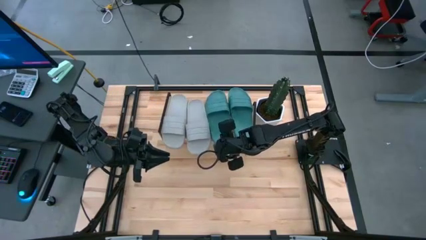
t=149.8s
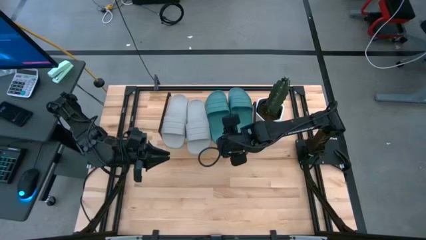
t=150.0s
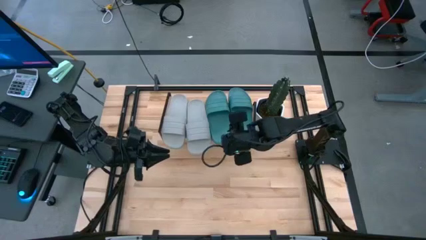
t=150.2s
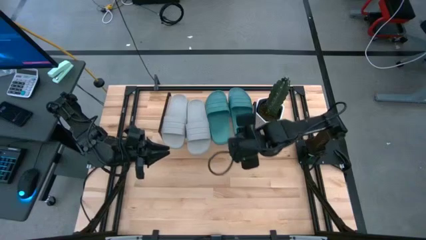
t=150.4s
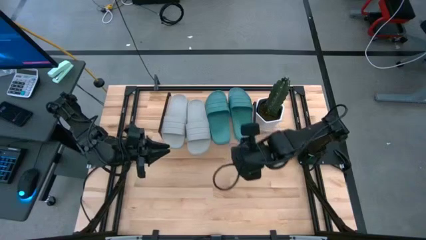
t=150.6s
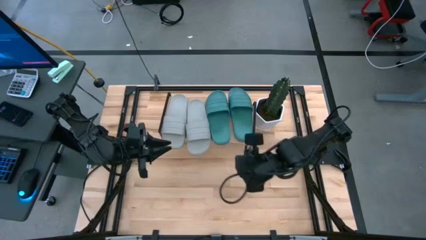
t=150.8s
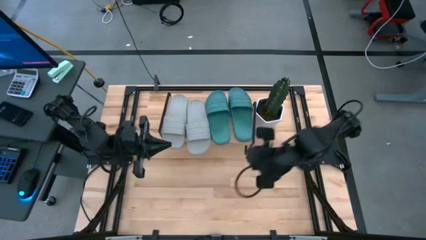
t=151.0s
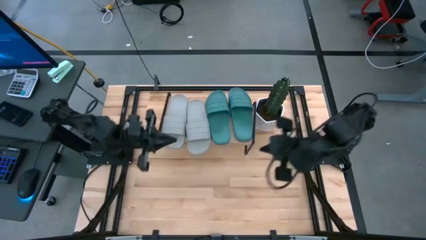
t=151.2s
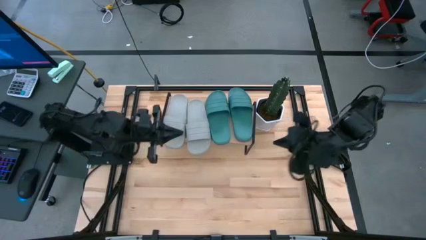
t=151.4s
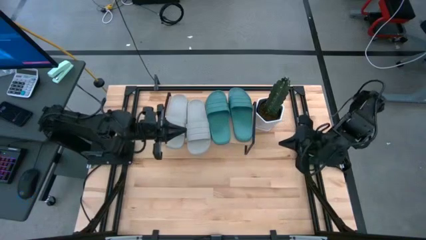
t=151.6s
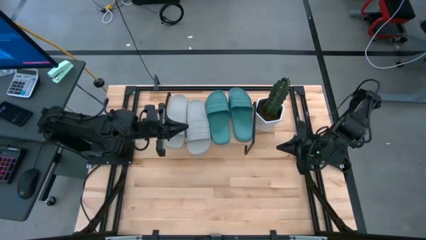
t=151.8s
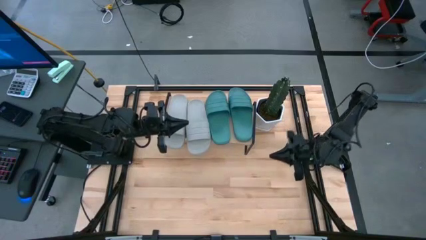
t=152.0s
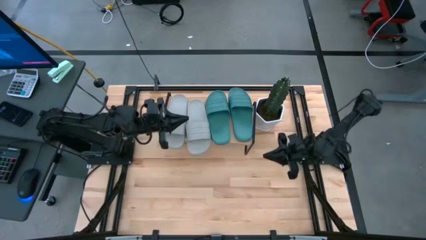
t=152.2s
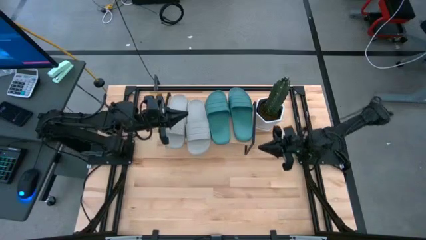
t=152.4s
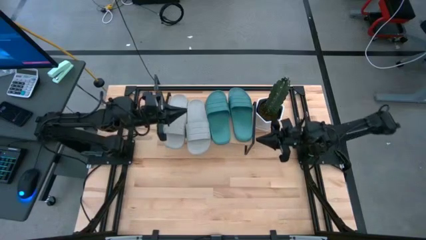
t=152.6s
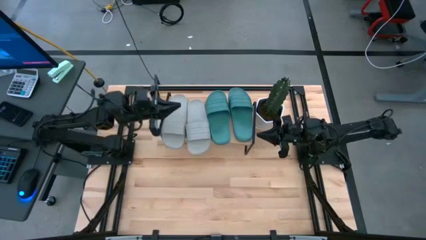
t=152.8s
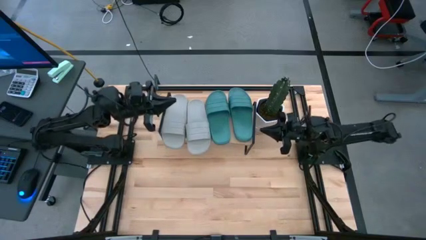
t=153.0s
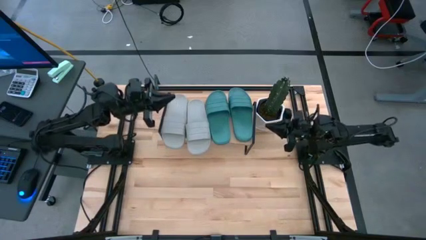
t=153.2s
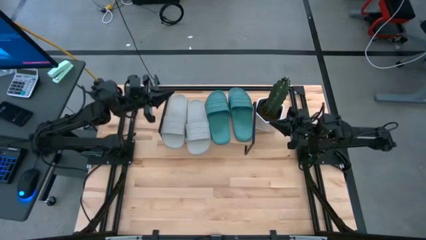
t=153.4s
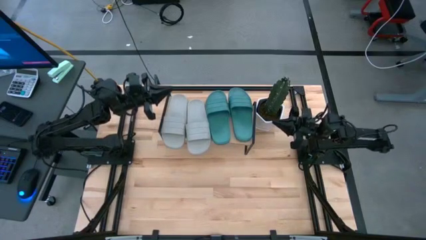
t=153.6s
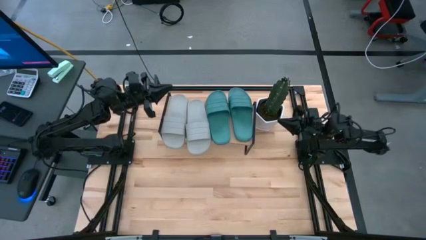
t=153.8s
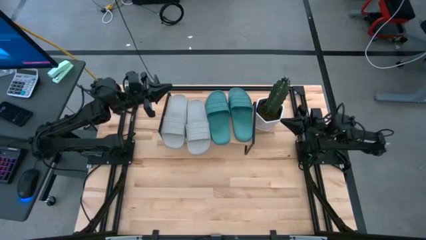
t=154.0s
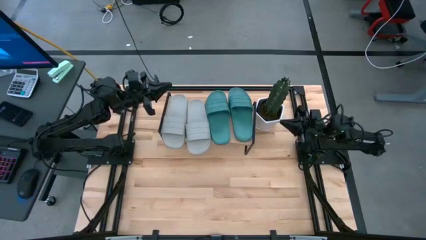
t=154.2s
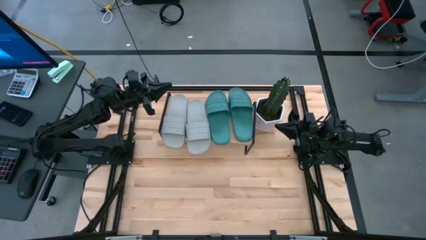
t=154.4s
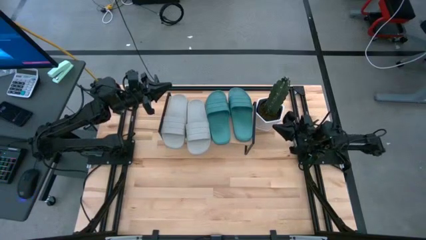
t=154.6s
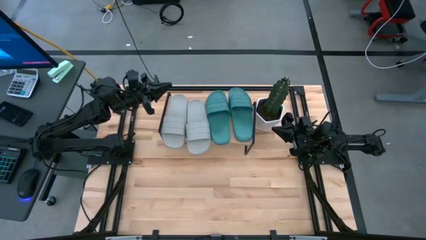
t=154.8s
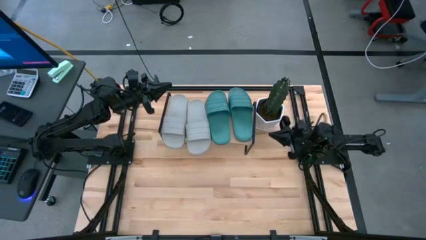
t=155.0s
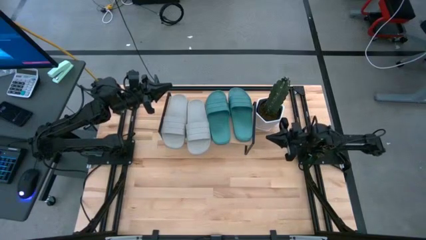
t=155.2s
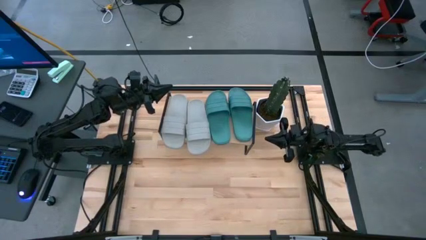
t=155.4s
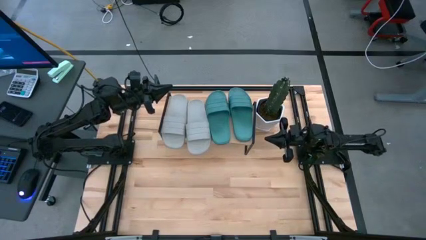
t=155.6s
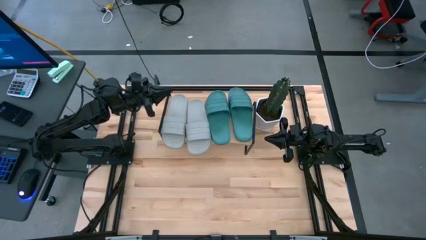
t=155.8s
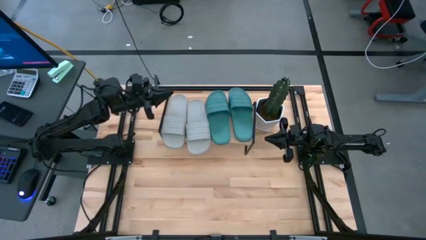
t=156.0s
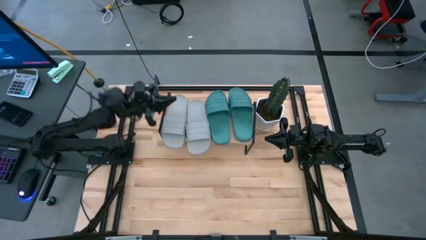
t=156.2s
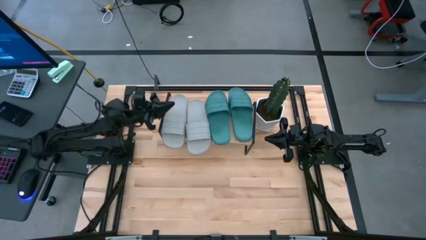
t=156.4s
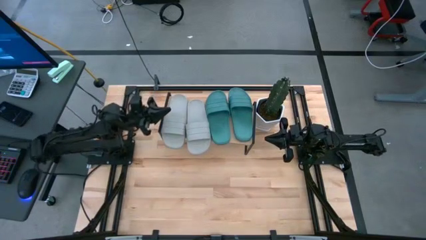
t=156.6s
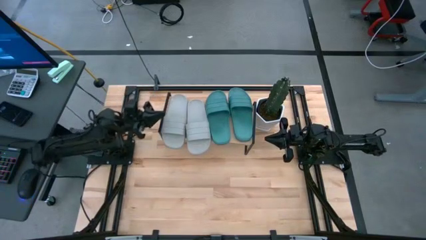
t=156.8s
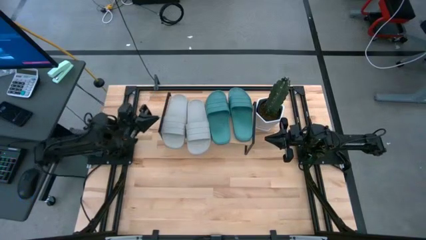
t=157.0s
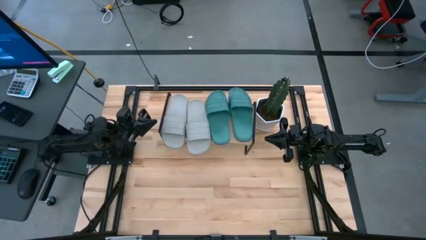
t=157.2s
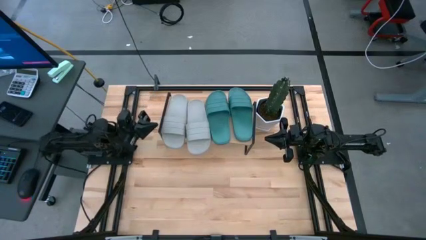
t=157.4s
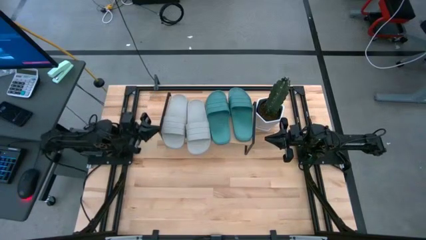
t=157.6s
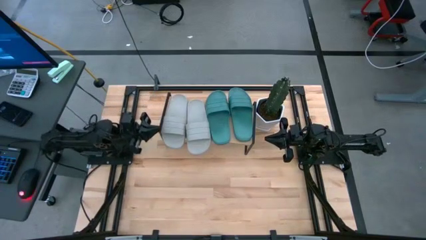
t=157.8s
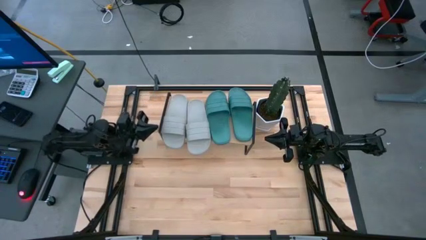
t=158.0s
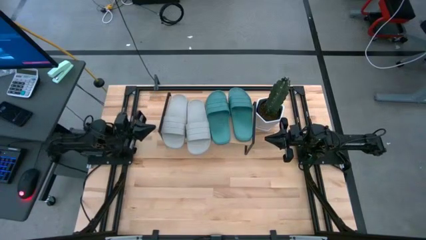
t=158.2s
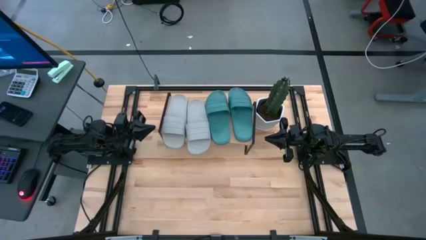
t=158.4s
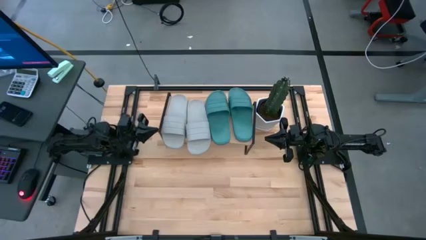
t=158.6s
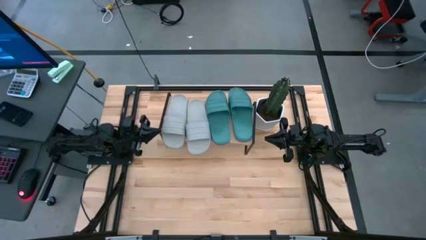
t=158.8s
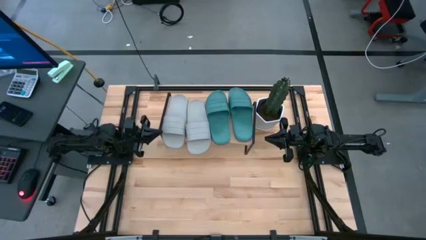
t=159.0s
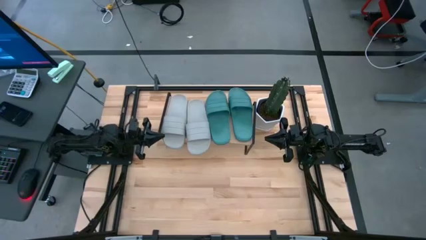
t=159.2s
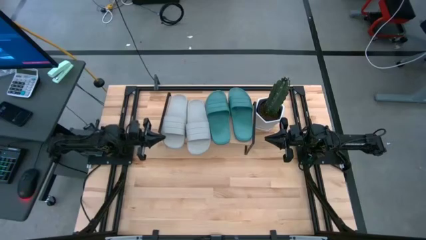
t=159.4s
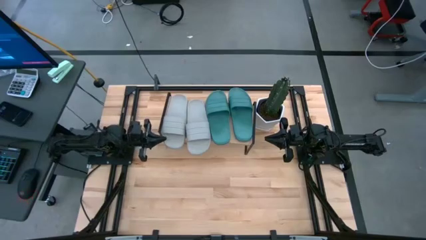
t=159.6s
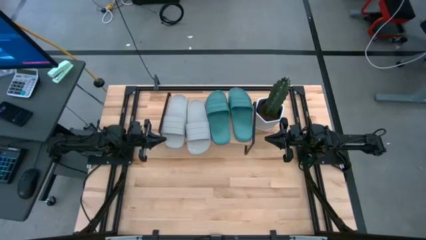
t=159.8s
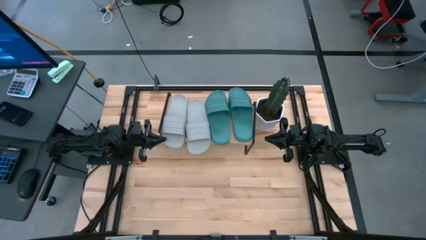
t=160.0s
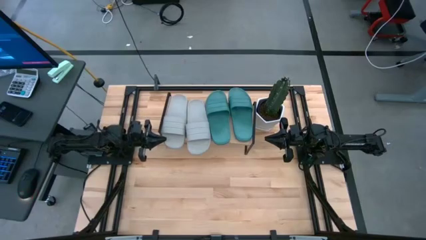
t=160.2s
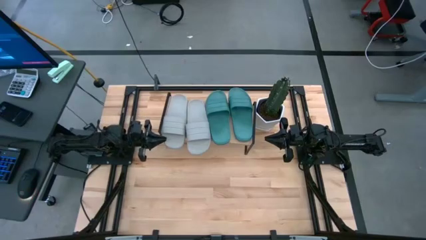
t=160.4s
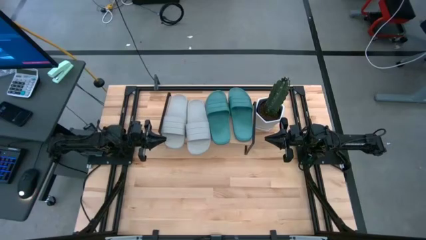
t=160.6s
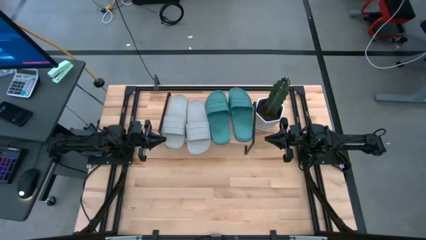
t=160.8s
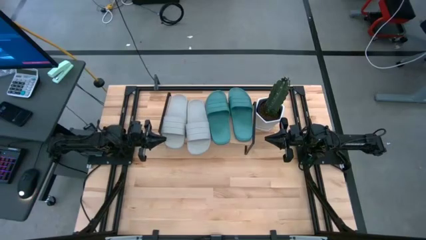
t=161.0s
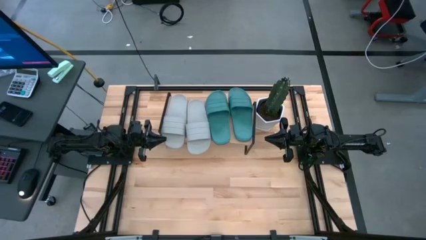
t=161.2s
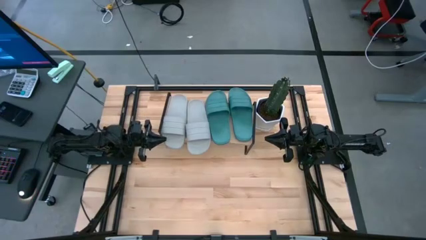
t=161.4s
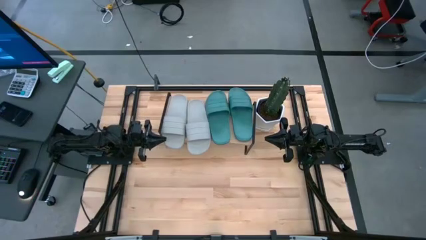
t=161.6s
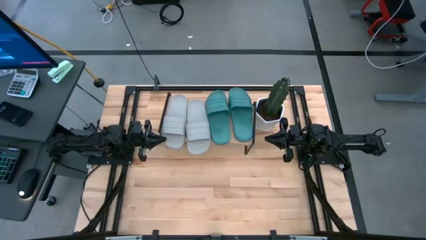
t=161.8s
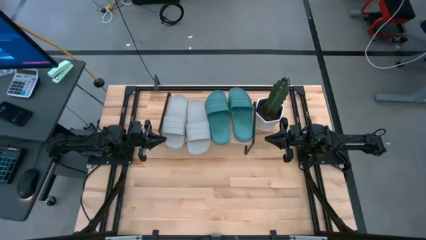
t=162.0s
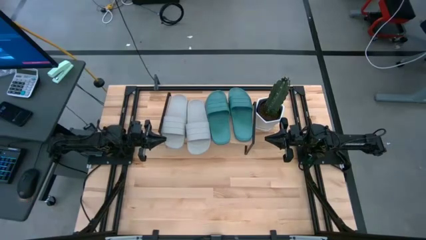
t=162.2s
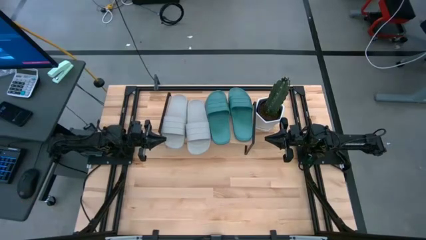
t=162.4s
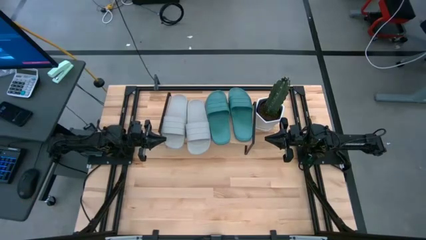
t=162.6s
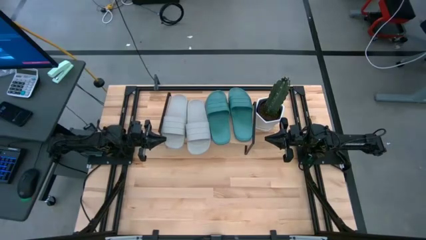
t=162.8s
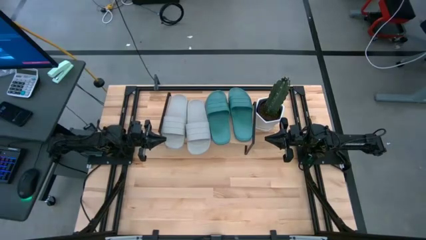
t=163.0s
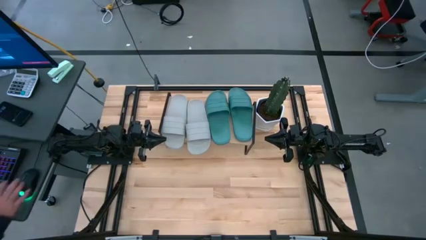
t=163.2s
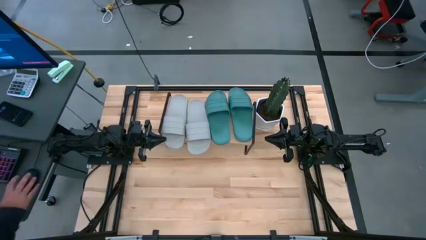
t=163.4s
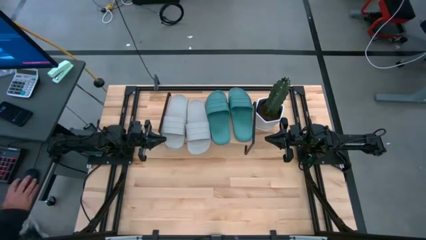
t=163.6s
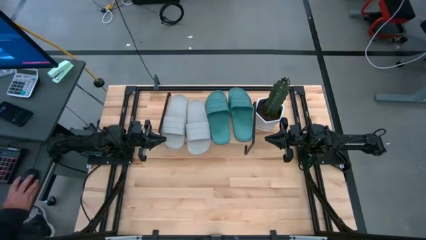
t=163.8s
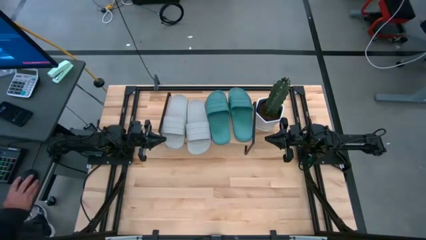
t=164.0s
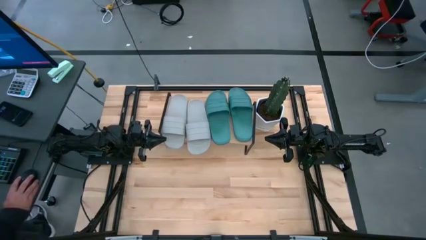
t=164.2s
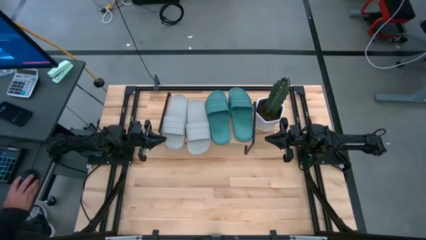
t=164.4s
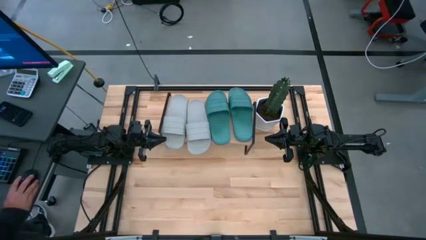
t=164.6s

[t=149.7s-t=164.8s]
Task: Pick and place slides into the shelf
Return to Home Position

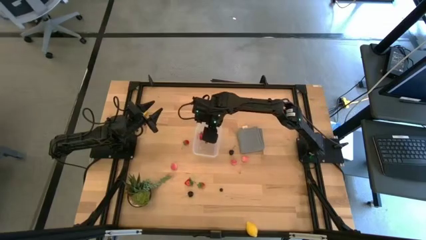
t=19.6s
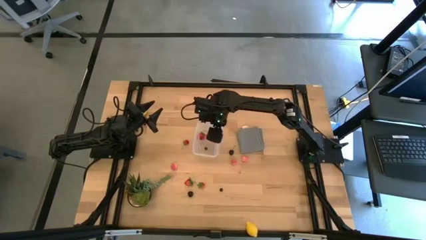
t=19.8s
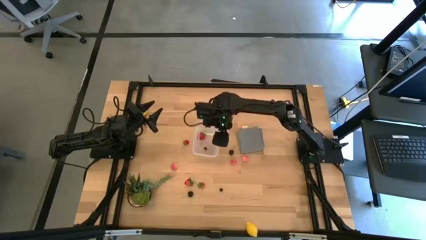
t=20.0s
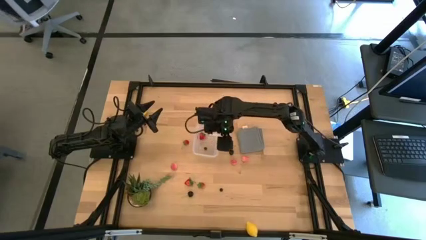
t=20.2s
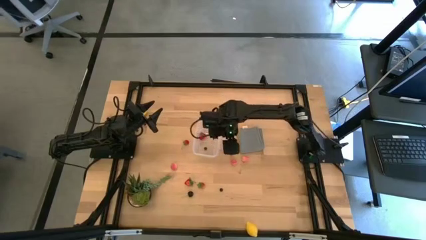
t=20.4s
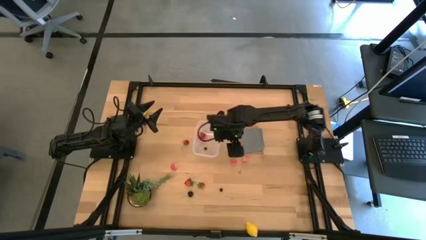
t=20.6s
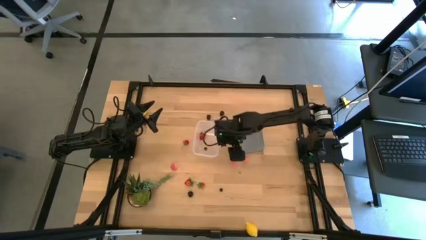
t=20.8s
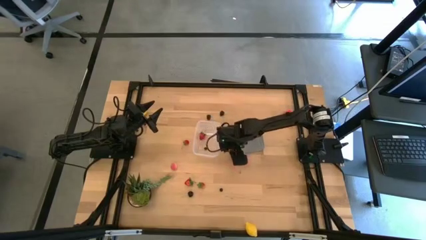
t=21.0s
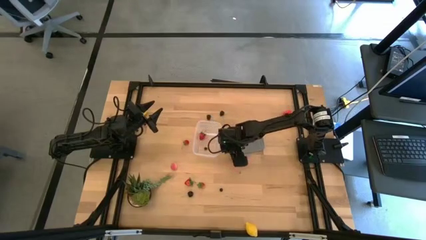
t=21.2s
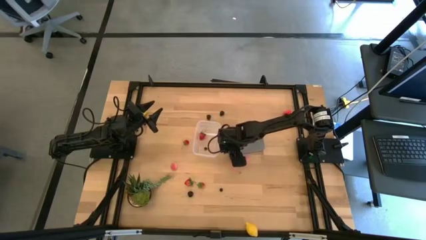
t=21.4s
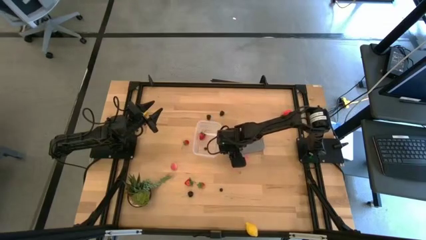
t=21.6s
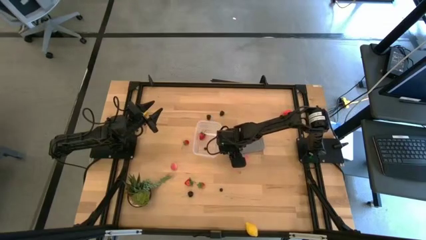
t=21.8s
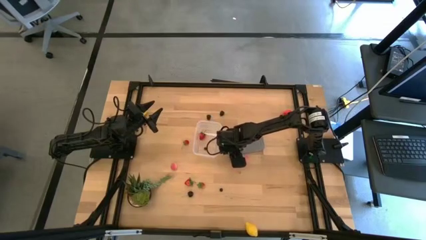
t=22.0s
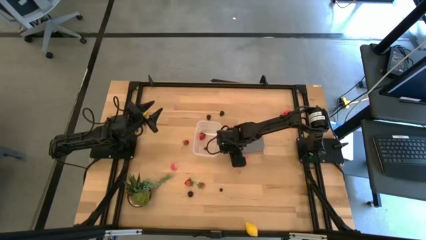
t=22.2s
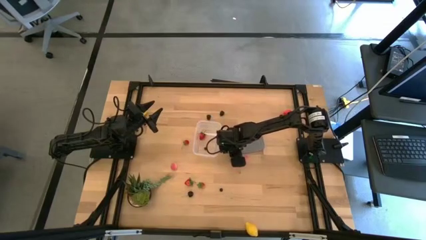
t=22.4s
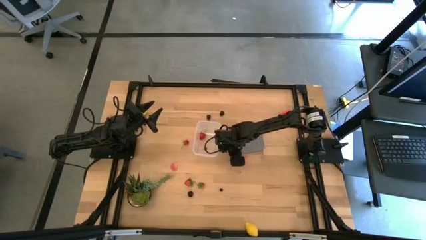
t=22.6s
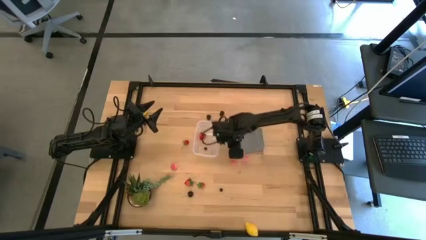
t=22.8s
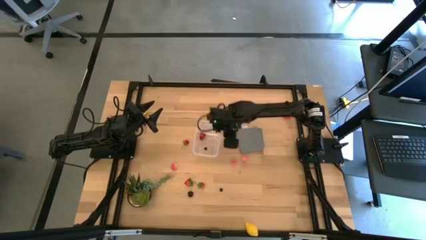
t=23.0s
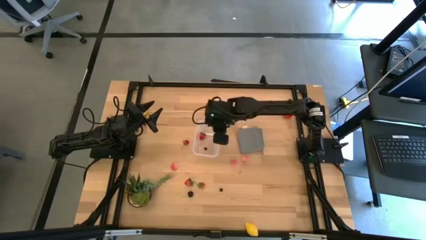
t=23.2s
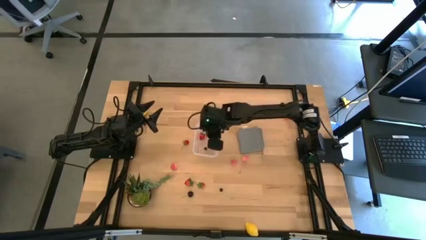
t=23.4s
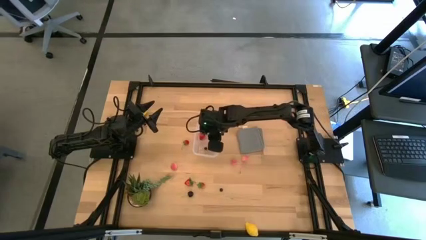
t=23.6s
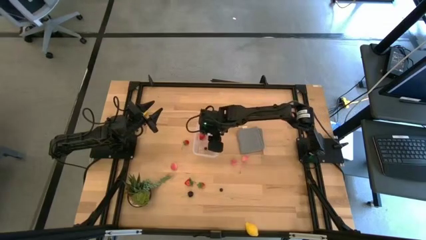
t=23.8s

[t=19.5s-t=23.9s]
Task: Pick and placing Produce into tupperware
Put the black cherry into the transparent bin
